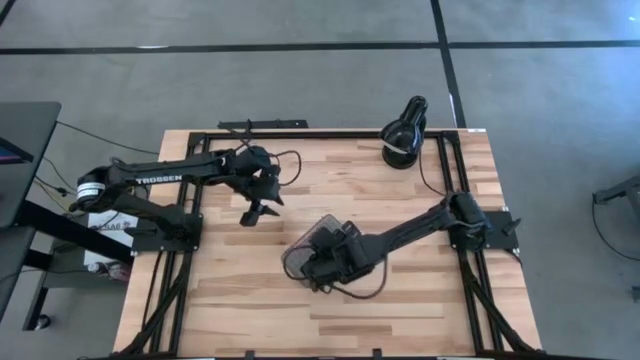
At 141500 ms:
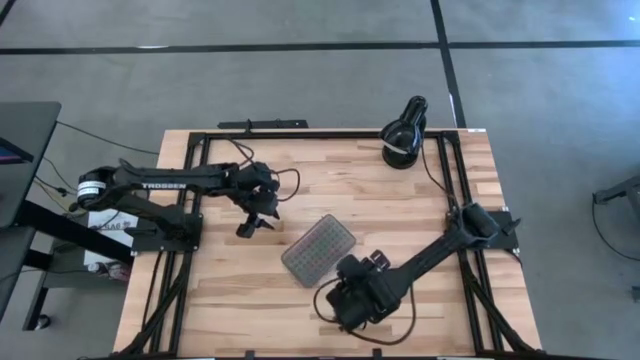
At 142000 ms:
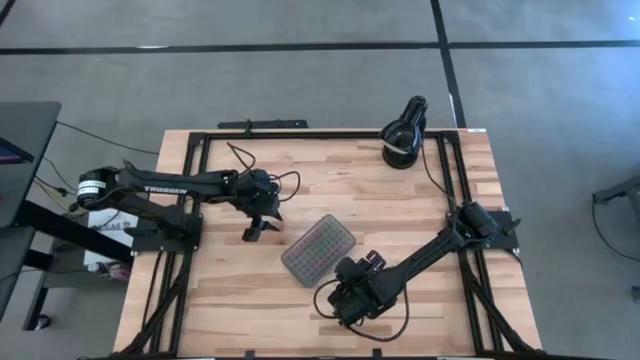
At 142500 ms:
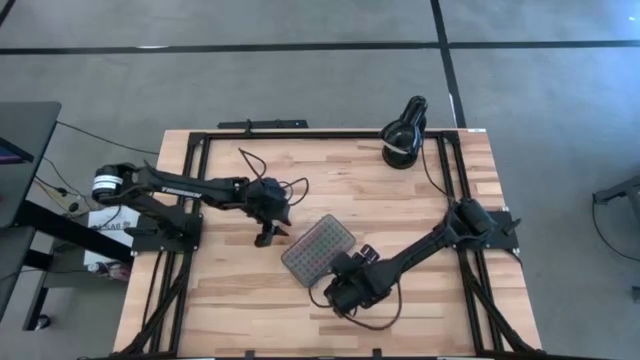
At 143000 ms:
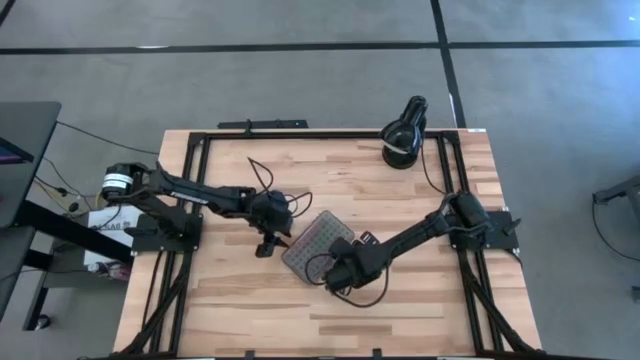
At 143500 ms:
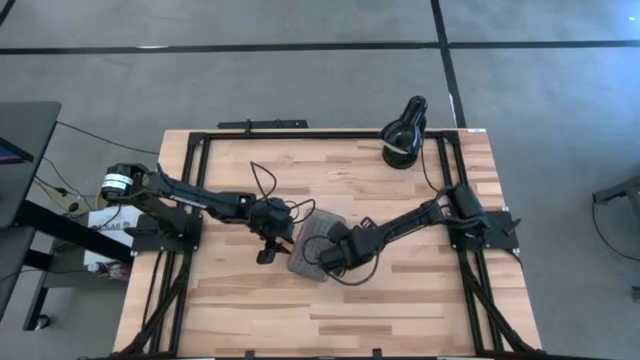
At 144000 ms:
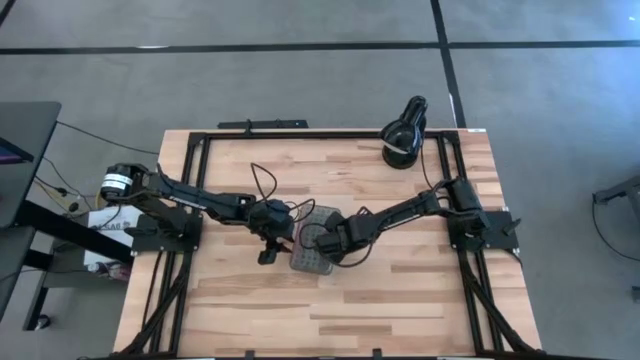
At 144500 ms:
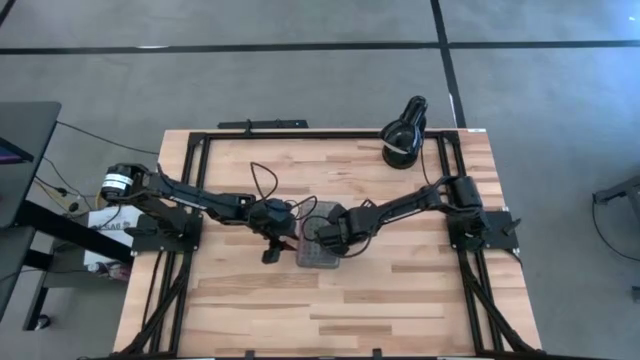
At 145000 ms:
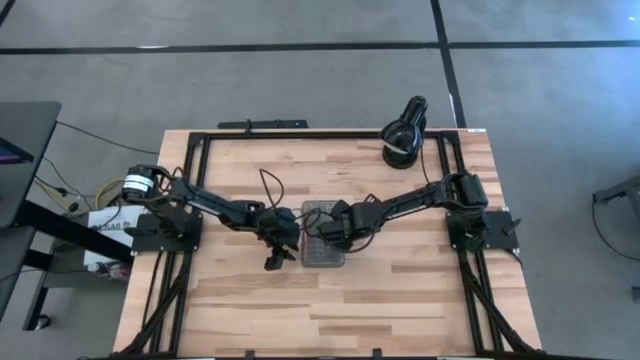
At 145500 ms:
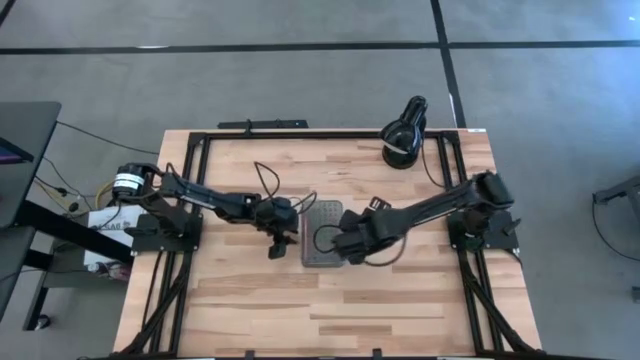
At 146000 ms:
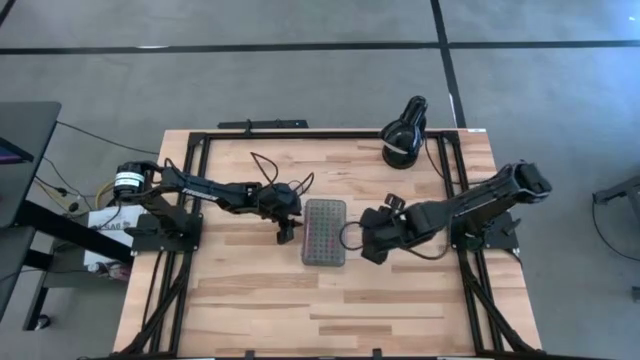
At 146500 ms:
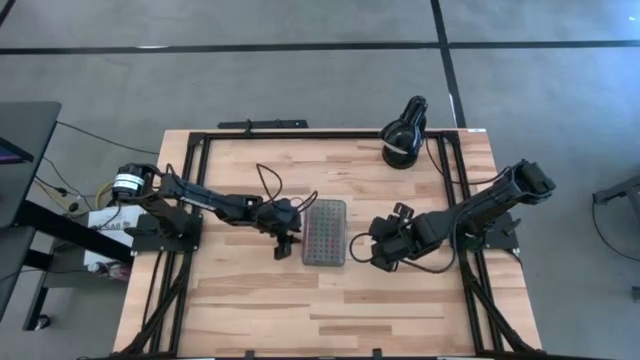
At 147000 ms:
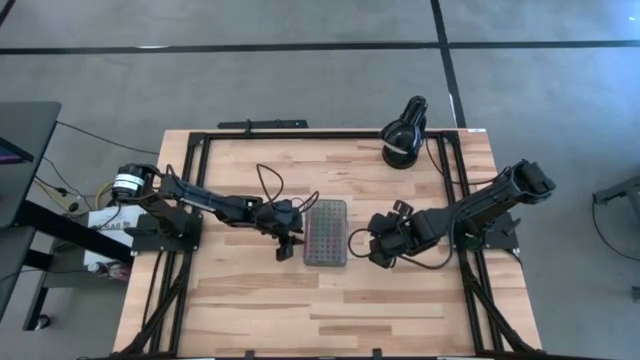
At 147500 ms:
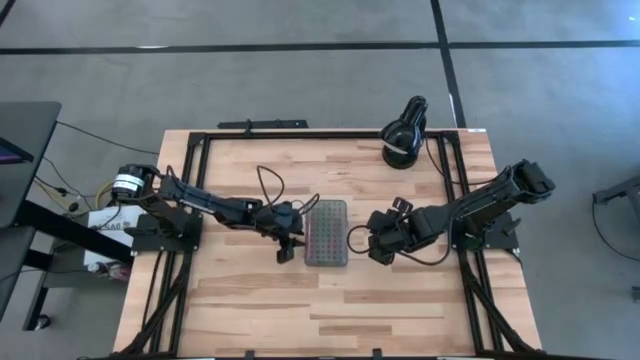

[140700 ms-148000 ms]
Task: Pick & place school supplies into a supply box
Adjust the supply box

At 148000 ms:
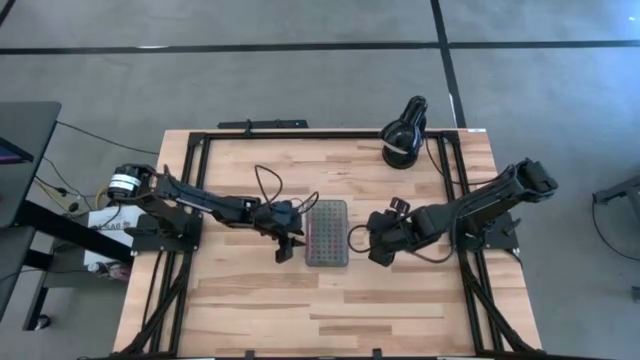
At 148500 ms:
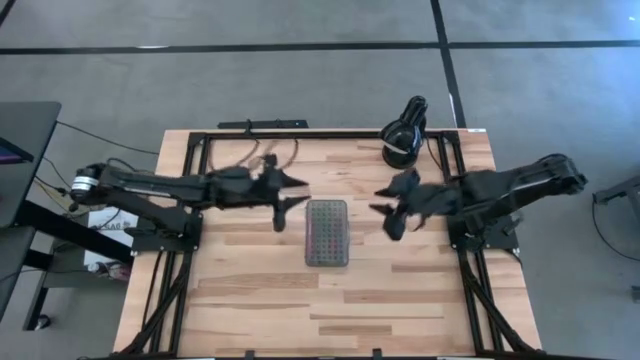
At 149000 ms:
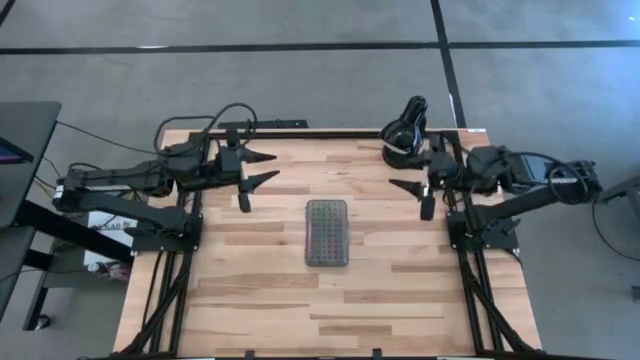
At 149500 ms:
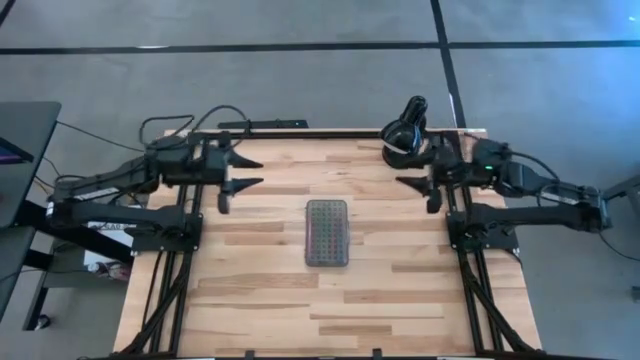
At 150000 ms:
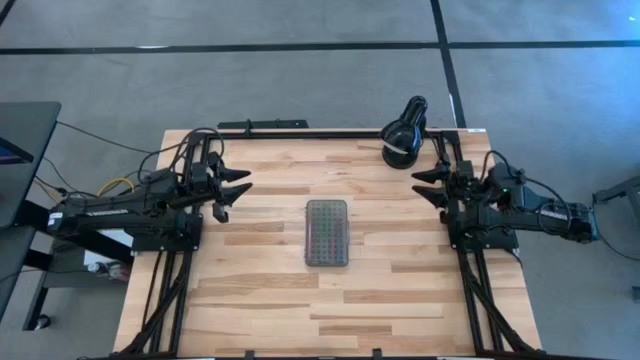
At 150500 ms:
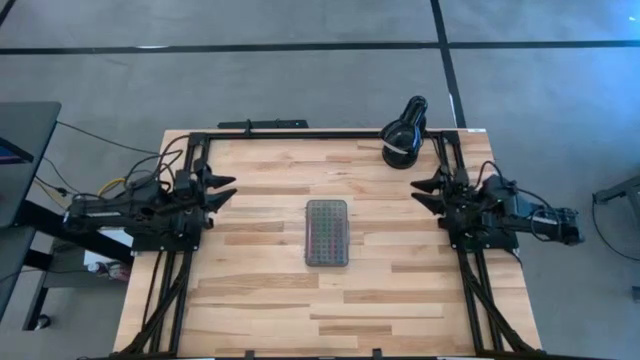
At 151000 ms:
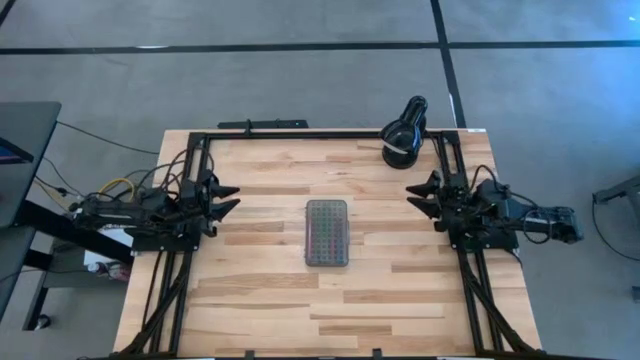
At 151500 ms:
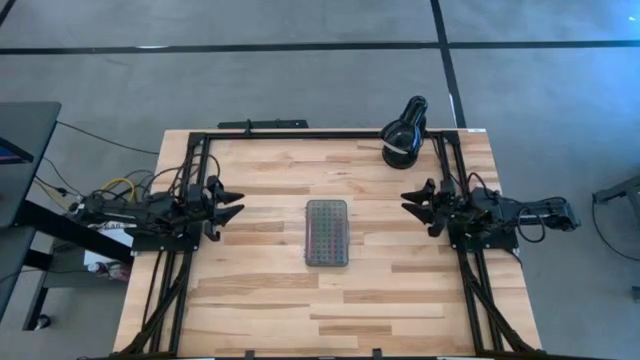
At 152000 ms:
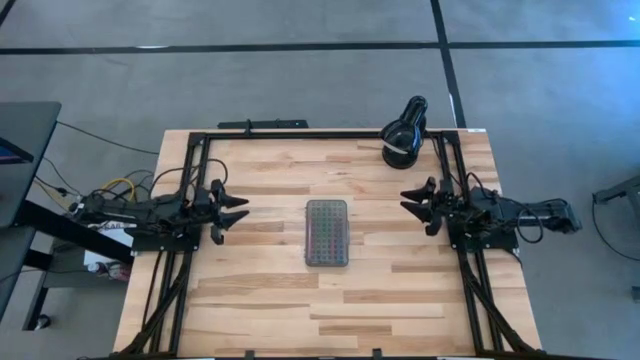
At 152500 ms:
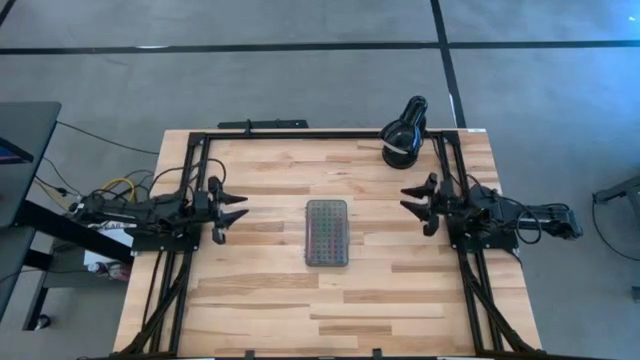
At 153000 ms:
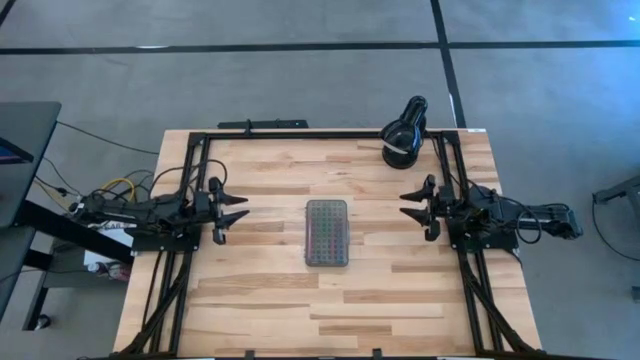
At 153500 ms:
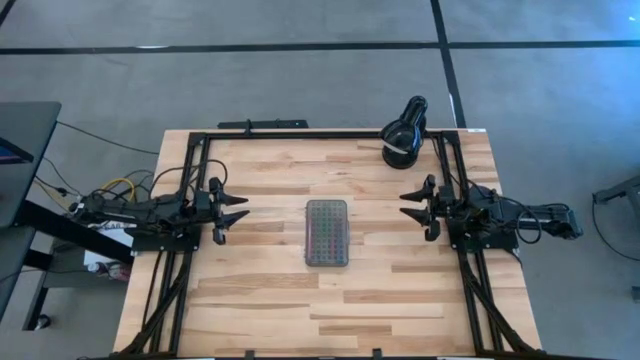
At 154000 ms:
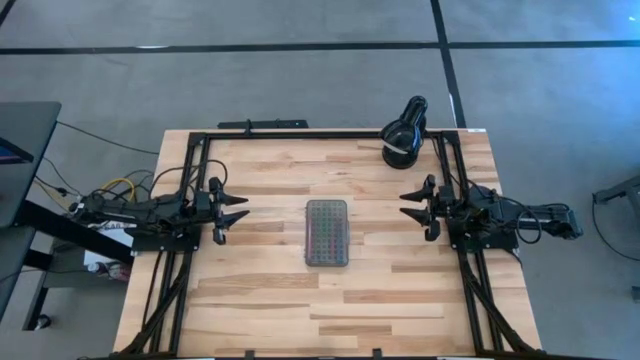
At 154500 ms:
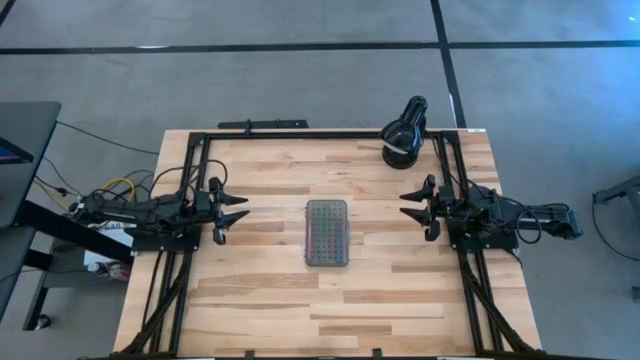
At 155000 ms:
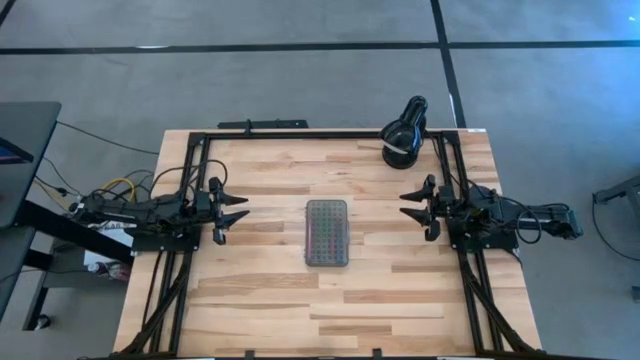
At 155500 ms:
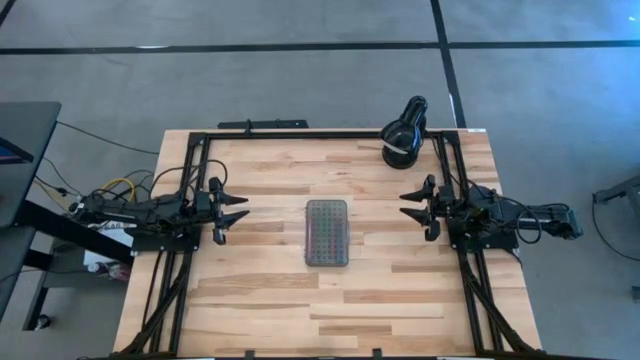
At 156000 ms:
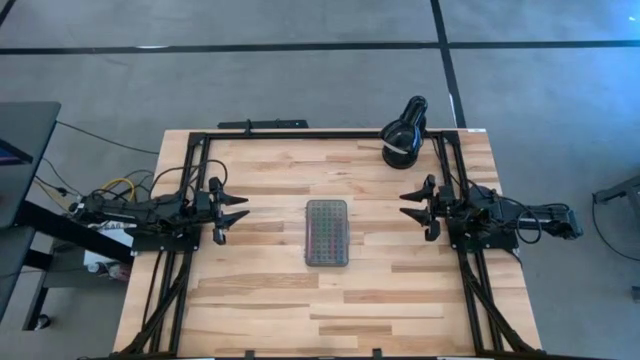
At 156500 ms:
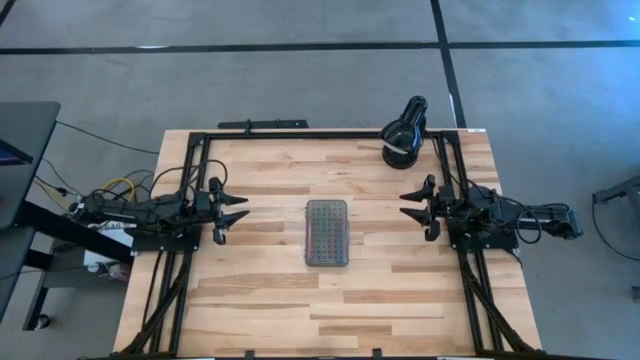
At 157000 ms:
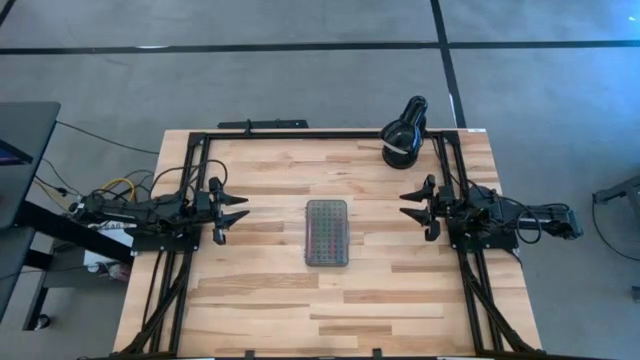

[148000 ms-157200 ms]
Return to Home Position

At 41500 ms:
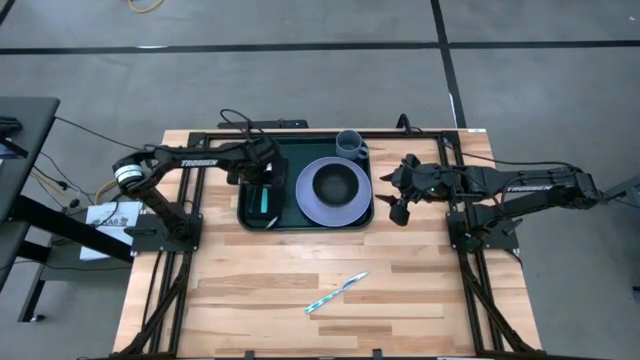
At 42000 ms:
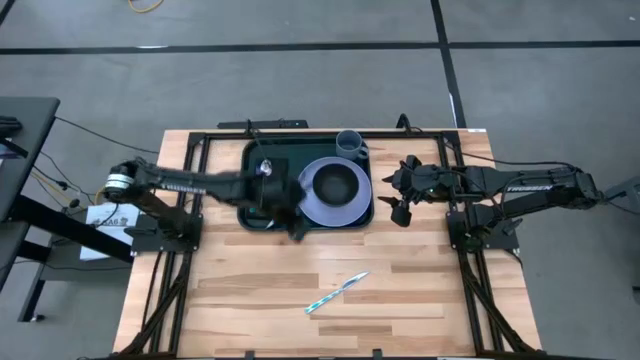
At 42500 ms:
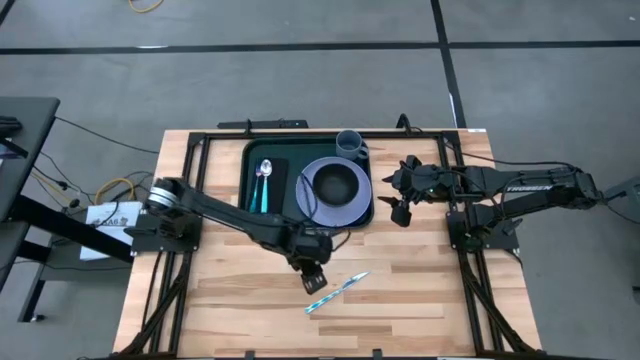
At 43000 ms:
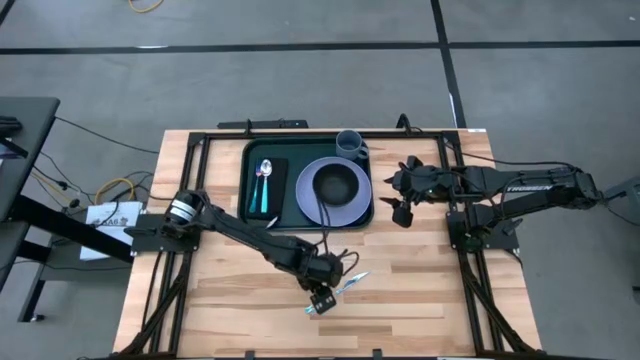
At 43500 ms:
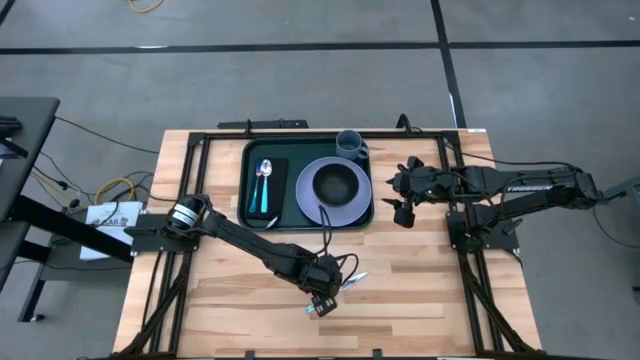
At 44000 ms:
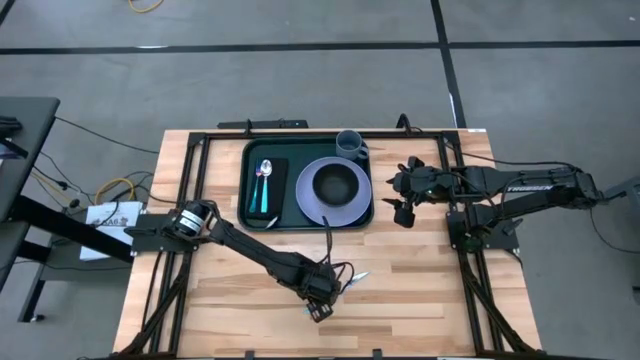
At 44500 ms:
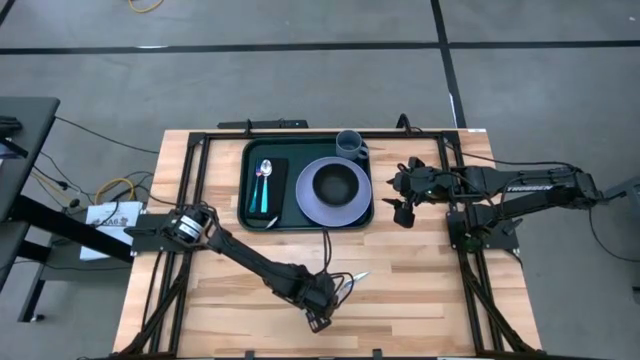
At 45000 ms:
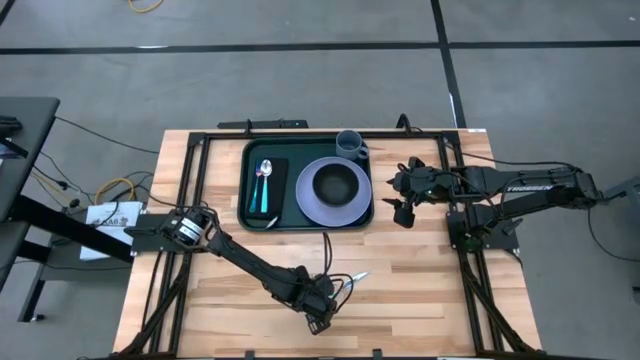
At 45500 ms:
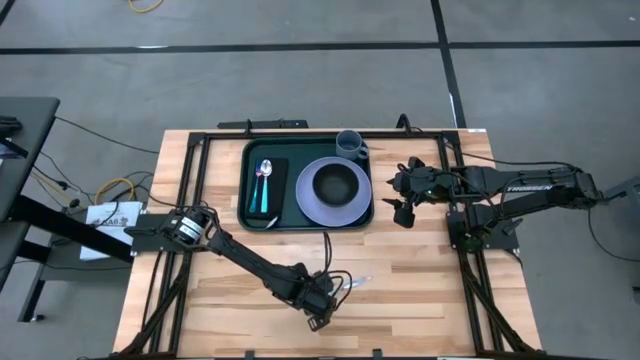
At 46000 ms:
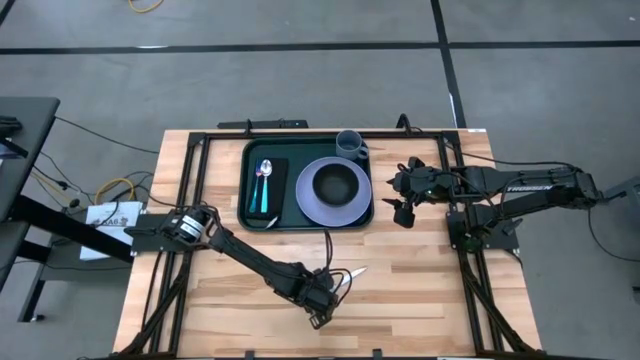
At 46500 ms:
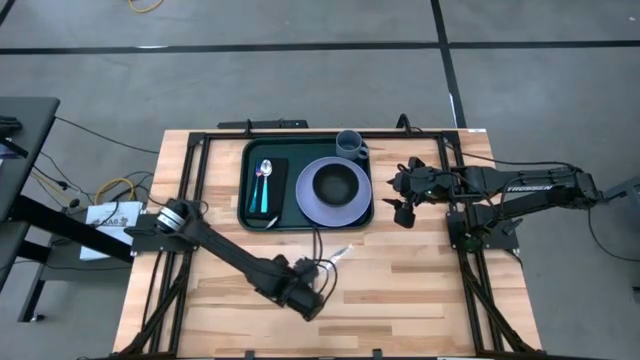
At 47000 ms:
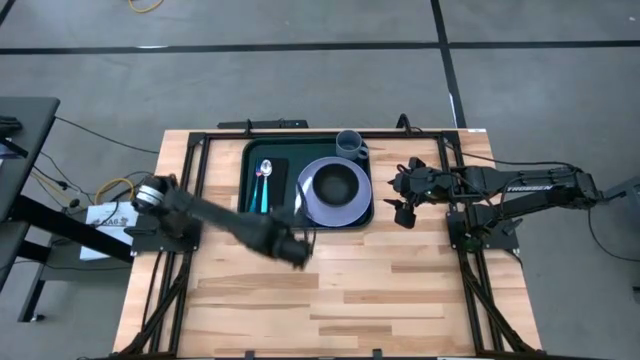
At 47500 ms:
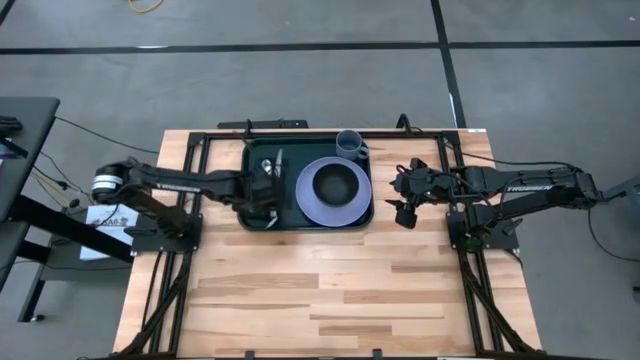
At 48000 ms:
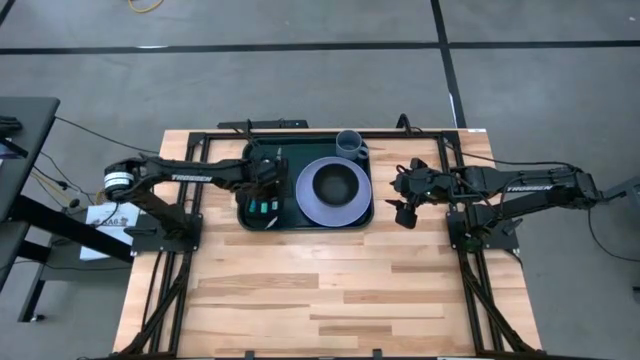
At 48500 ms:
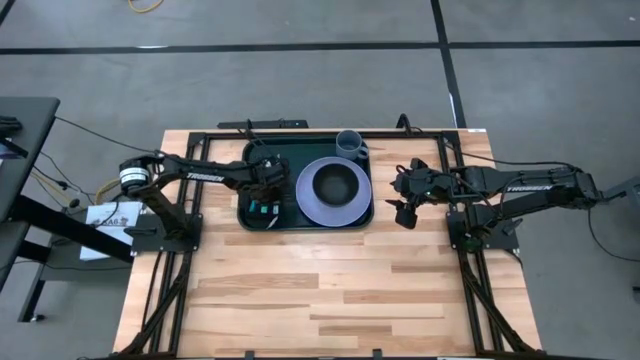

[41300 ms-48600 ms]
Task: Set up tray
Put the white patterned knife on top of the black napkin to the right of the blue spoon
